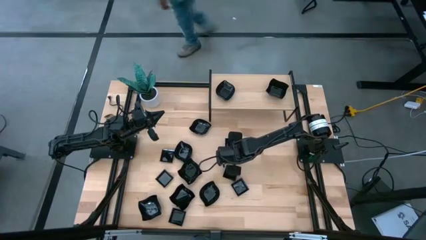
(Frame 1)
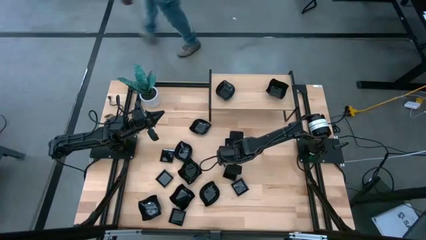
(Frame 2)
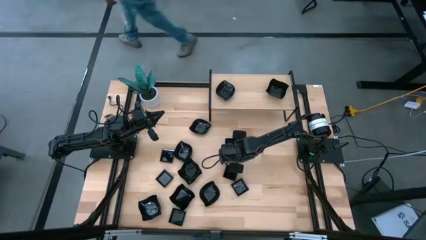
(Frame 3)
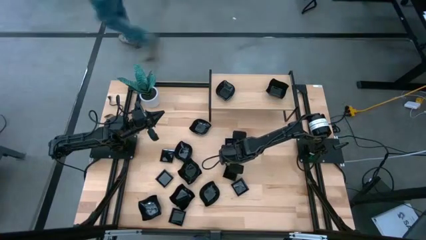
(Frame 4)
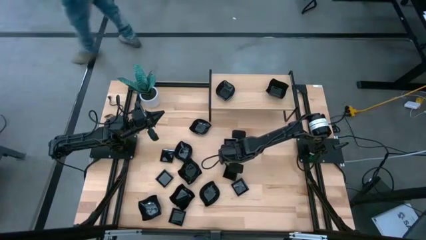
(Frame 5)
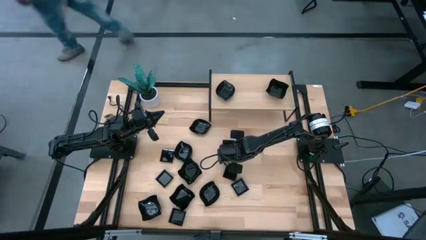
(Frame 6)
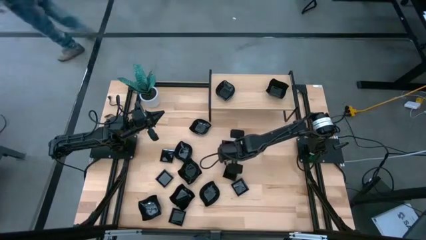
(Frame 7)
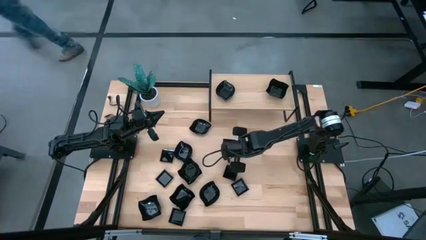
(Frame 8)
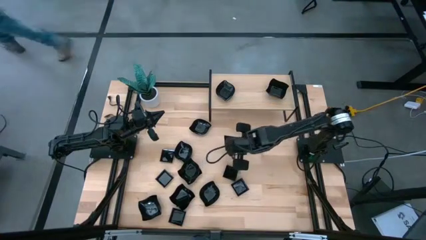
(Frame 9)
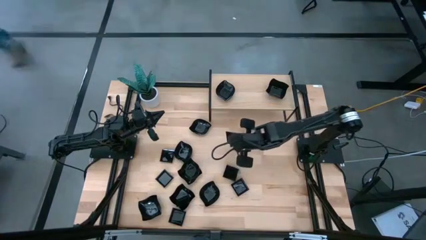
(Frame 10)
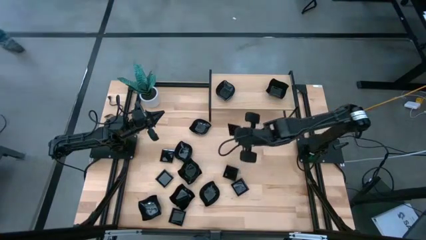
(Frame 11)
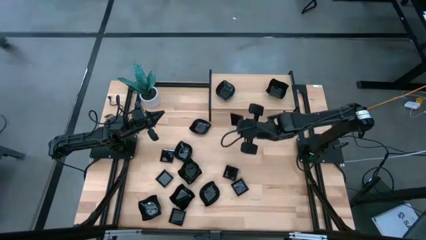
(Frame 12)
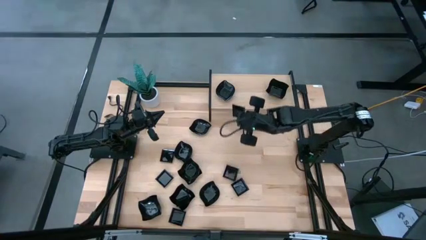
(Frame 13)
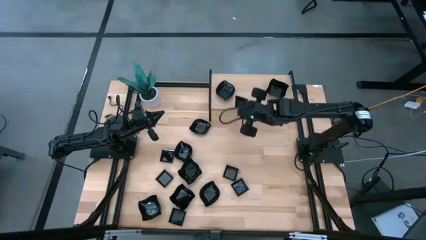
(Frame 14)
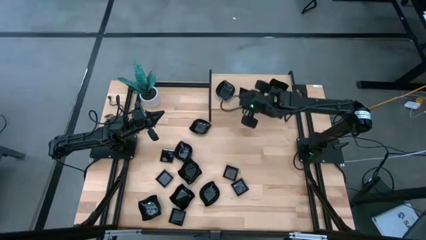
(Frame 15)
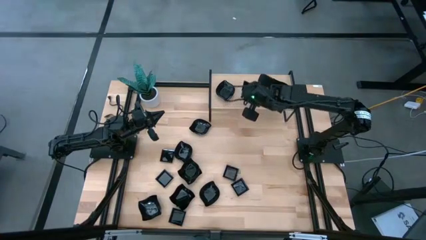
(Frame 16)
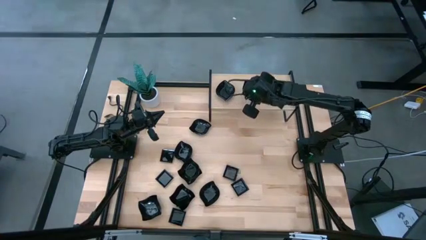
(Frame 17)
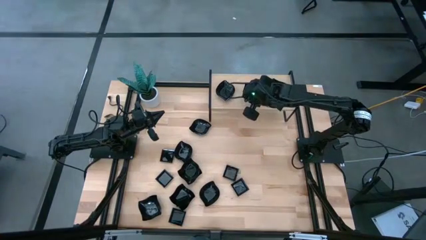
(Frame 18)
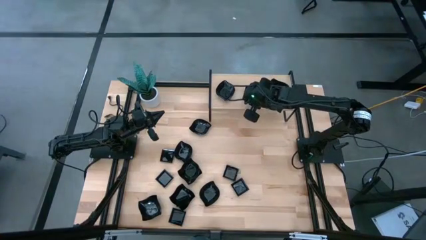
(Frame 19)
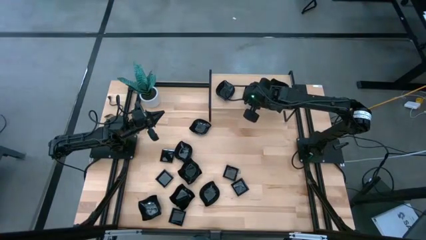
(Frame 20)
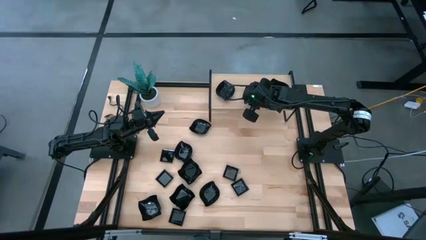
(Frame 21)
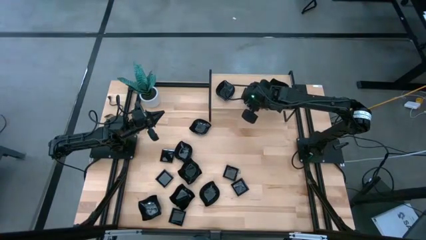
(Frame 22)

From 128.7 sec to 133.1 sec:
Task: Pick & Place Mini shaped plates
Put the black square plate on the shelf

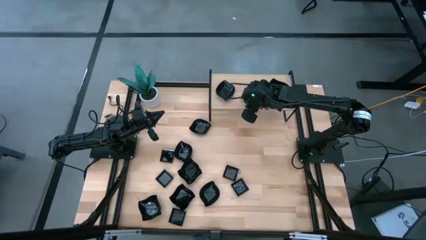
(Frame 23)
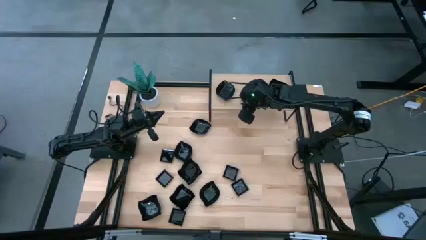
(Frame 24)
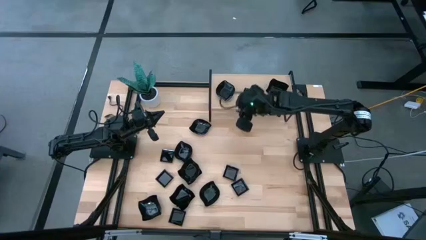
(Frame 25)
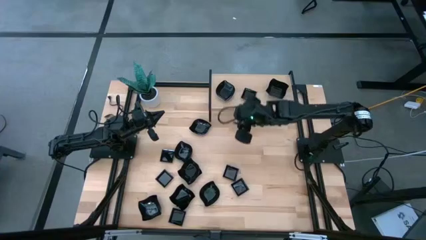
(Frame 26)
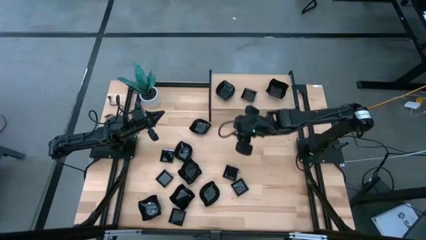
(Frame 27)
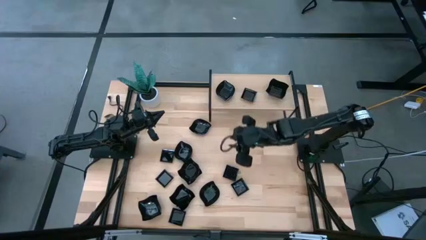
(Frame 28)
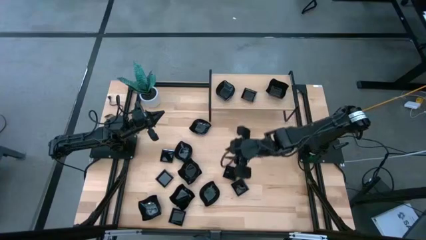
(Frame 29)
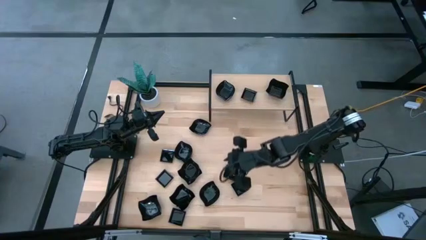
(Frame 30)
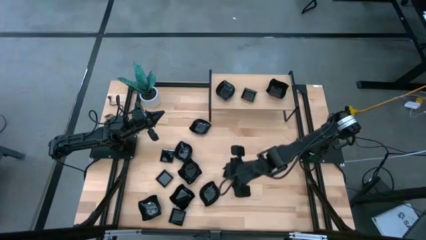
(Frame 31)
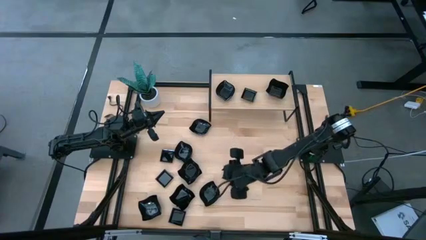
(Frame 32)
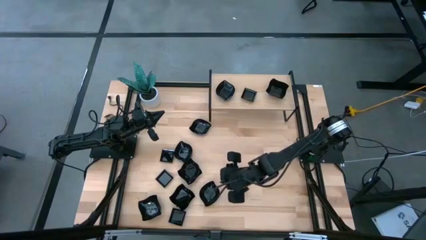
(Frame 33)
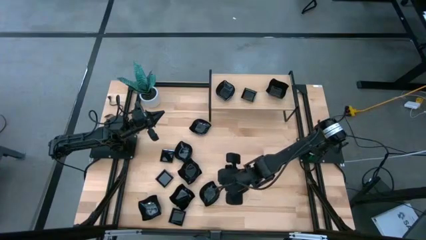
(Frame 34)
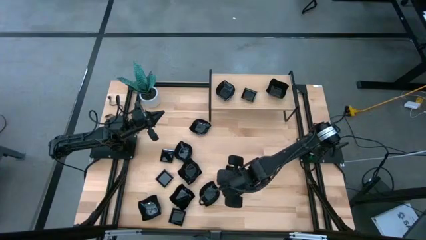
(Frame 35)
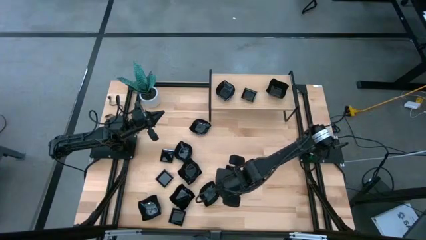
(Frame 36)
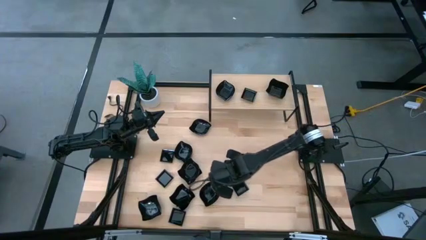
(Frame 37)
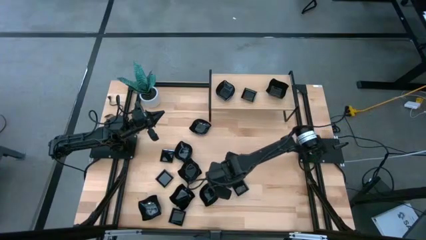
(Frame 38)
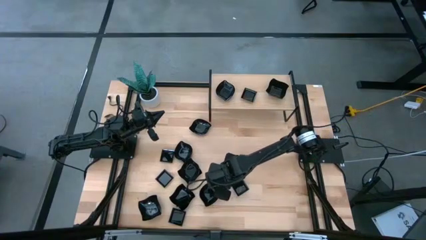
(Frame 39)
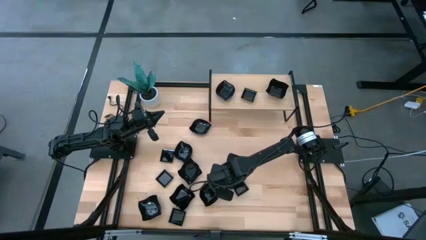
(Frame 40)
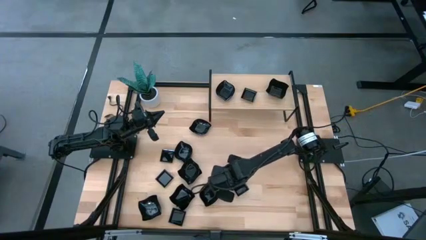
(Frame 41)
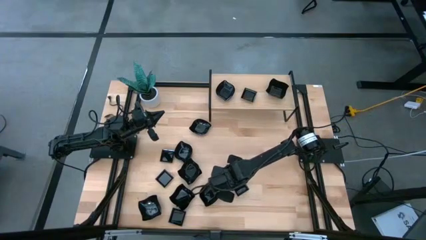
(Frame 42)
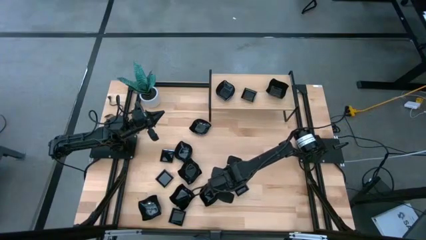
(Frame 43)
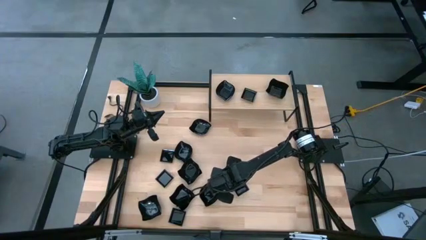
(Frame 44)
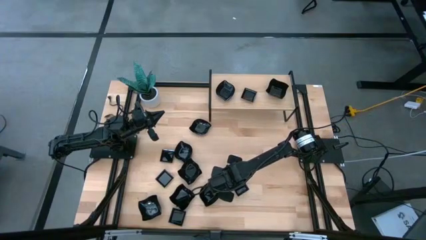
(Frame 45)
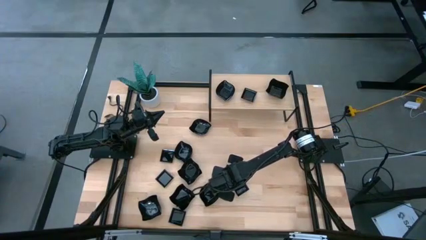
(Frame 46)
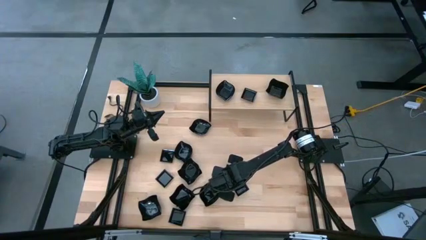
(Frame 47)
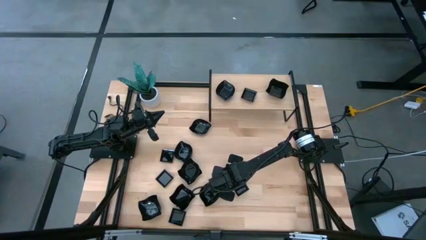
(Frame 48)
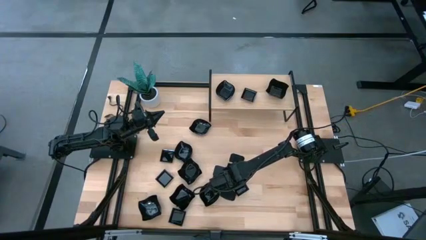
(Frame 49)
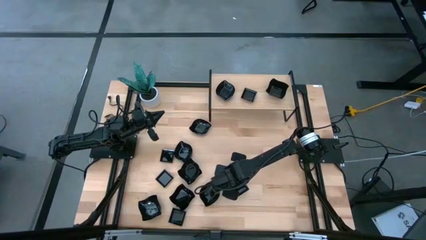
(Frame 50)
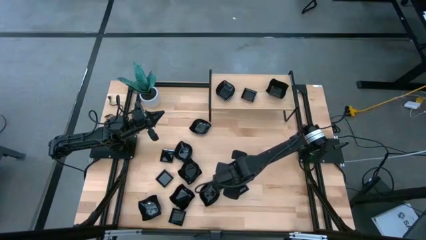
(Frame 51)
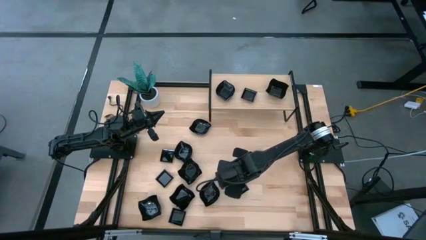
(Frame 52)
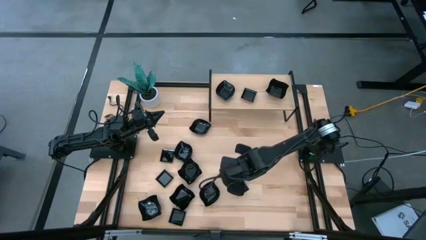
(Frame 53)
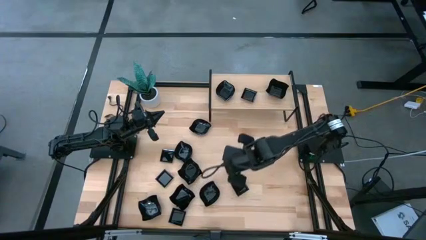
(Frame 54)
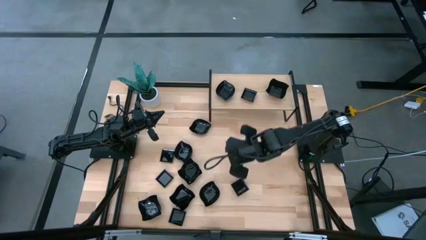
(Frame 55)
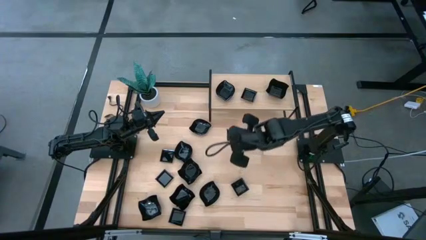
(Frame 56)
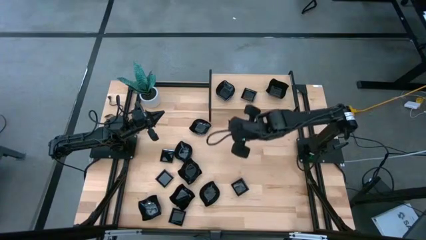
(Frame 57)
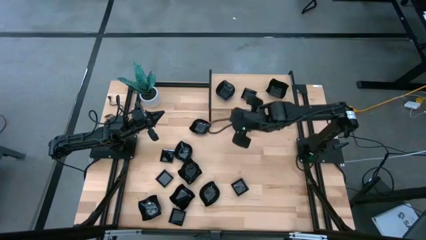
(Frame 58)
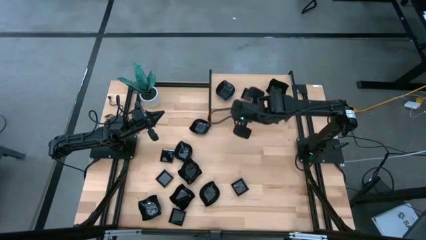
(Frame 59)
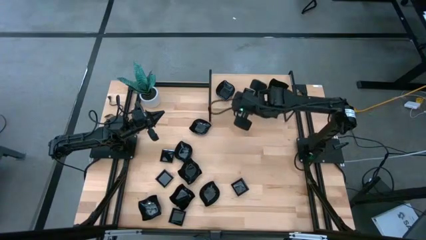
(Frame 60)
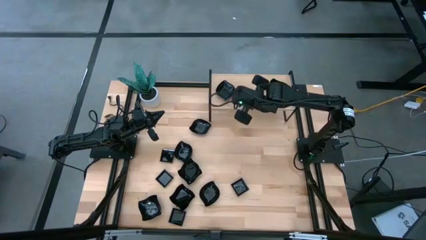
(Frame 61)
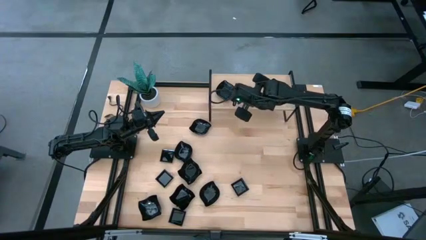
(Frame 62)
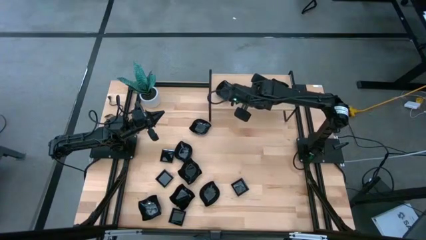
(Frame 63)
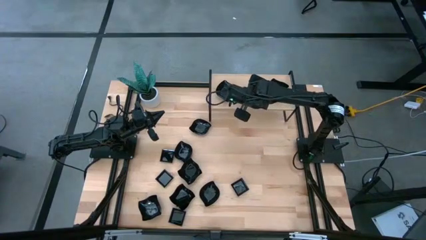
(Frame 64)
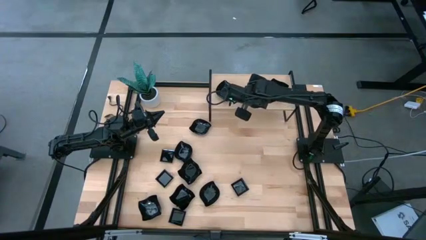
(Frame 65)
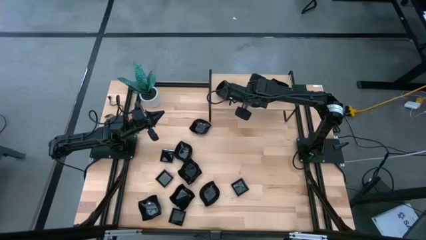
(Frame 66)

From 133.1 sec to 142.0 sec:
Stack the black square plate on top of the black square plate on the shelf

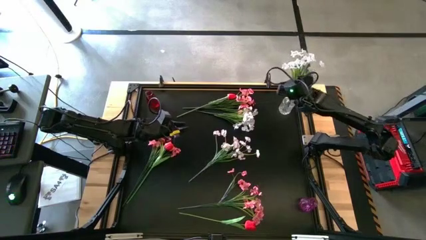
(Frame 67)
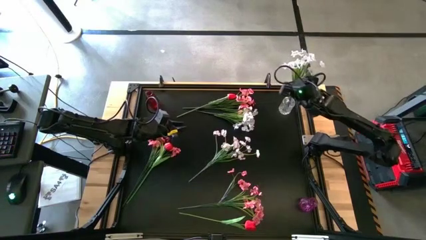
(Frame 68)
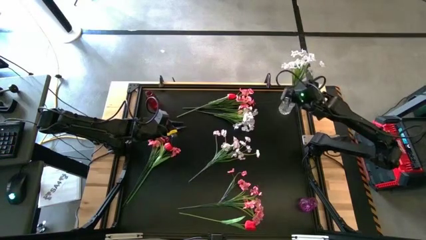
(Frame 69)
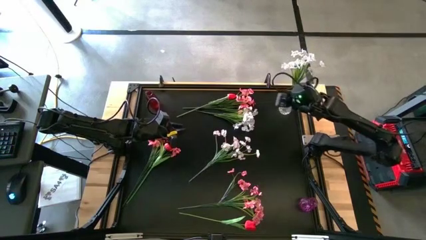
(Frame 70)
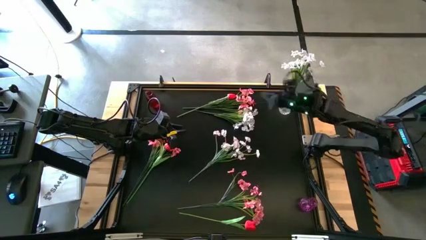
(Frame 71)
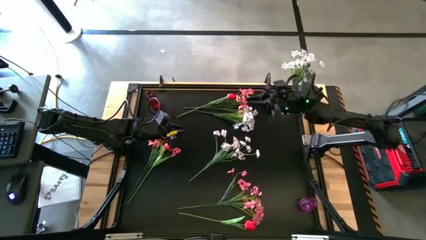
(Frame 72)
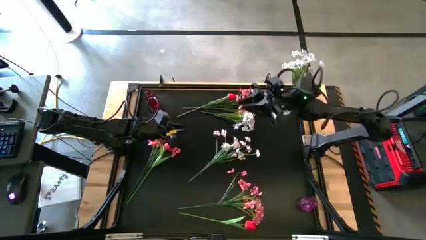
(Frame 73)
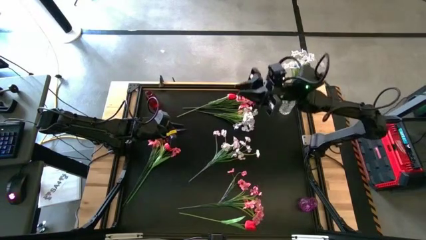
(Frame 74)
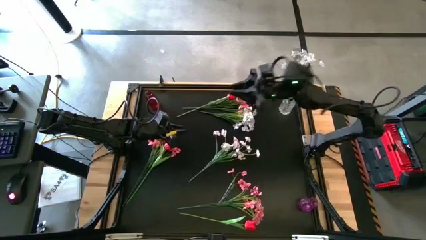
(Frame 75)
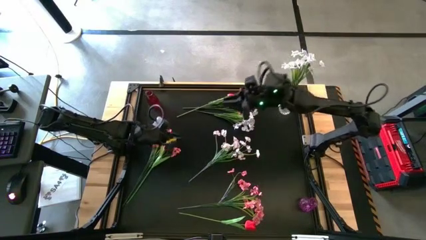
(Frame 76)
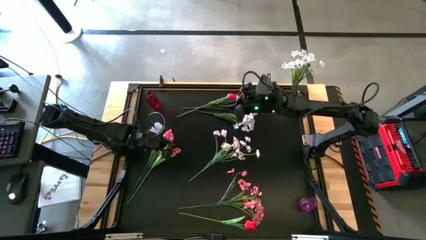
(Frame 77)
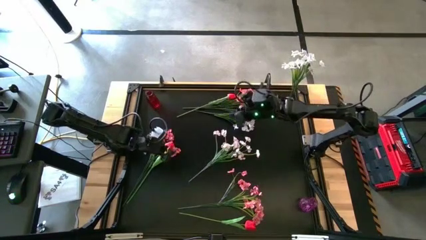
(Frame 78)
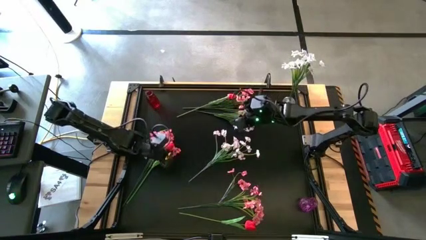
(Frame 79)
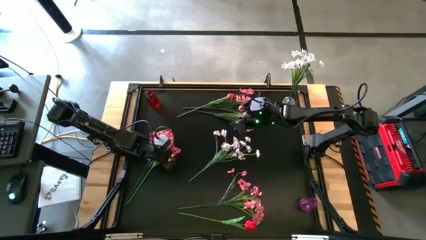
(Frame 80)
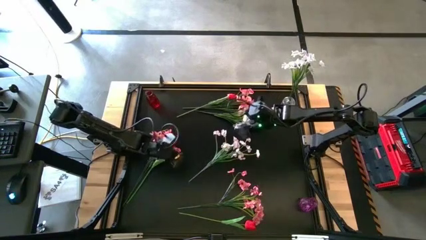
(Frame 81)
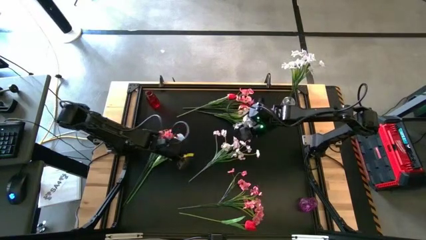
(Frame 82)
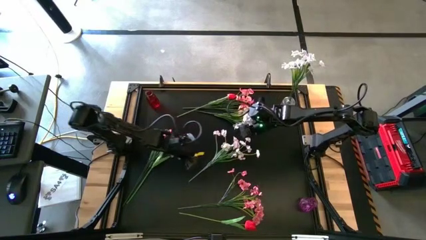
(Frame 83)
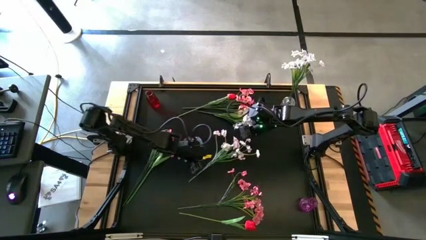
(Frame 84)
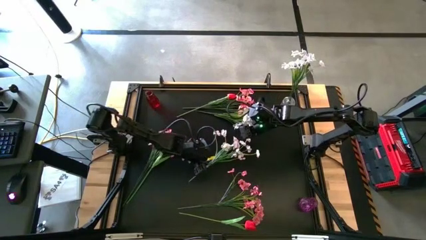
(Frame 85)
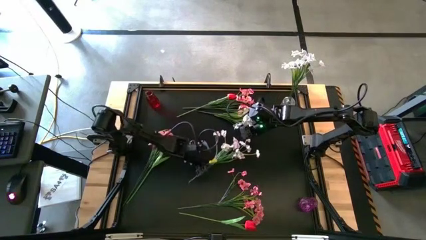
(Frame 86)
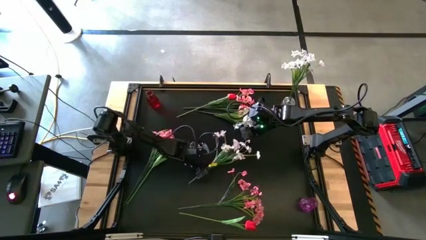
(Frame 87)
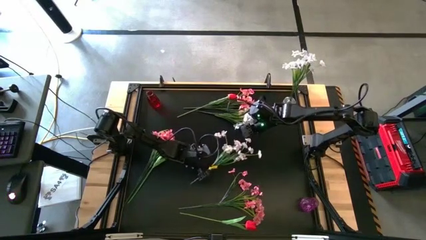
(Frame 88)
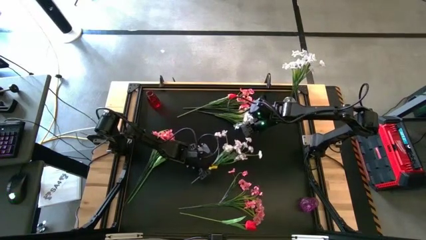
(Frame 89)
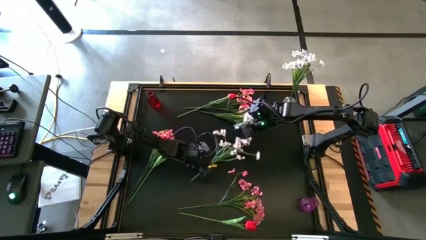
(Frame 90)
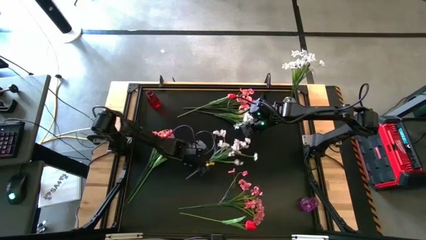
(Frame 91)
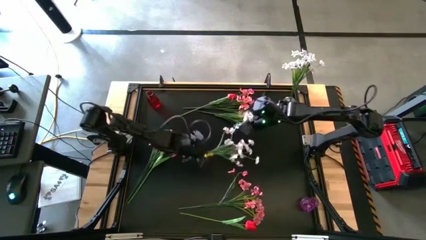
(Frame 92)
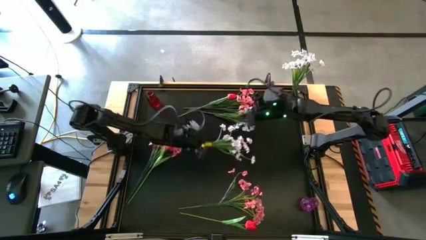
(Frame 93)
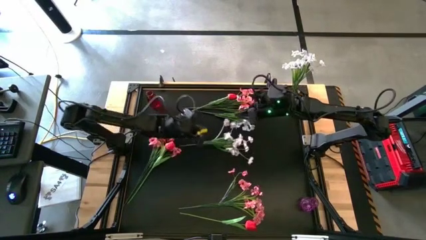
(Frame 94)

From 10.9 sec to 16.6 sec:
Task: Sort flowers into vase by color
Put the bottom white flowers into the transparent flower vase
